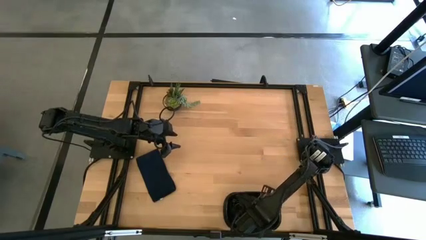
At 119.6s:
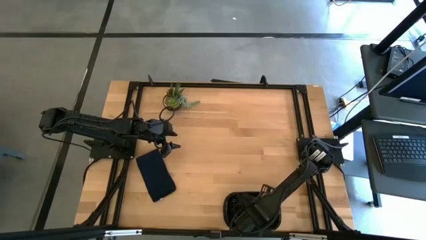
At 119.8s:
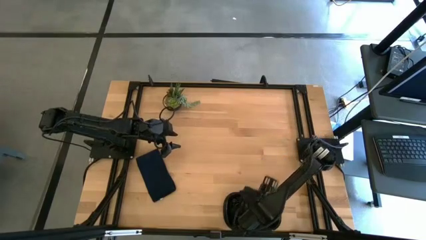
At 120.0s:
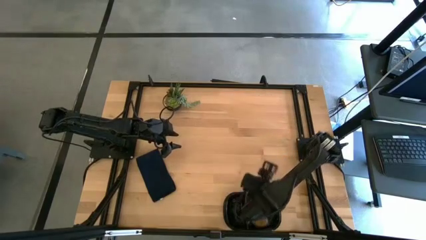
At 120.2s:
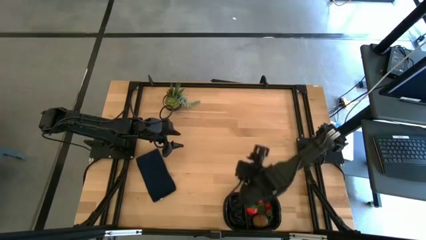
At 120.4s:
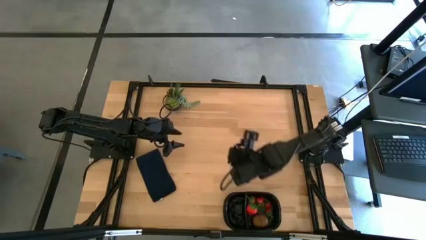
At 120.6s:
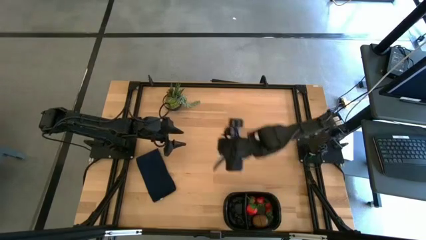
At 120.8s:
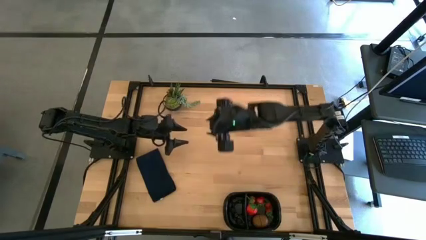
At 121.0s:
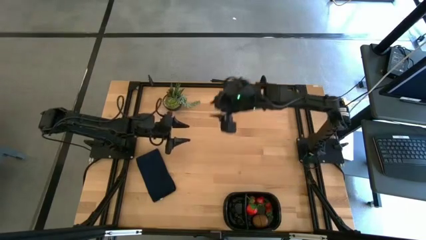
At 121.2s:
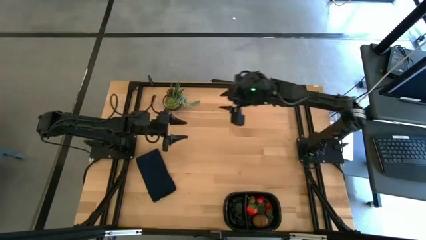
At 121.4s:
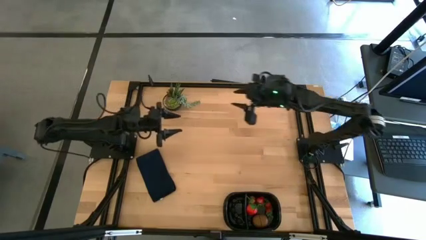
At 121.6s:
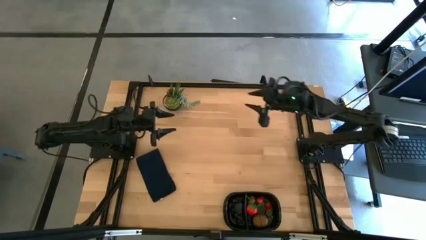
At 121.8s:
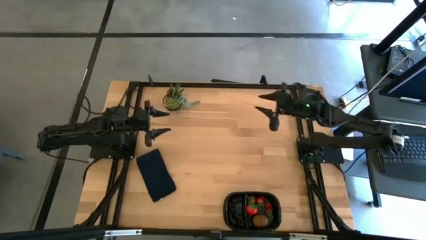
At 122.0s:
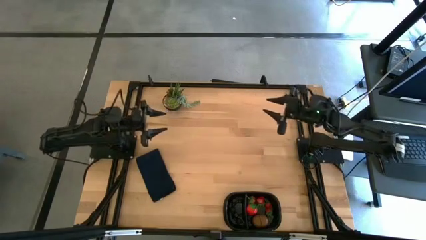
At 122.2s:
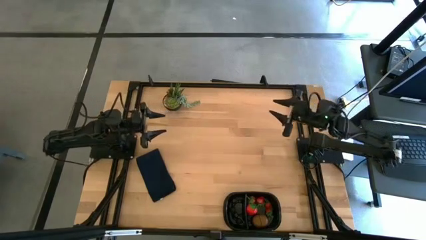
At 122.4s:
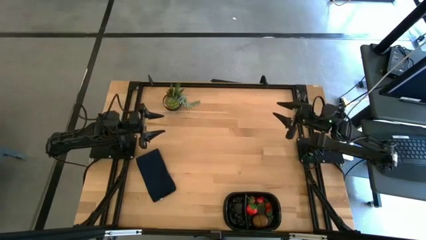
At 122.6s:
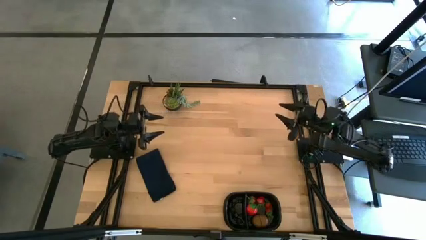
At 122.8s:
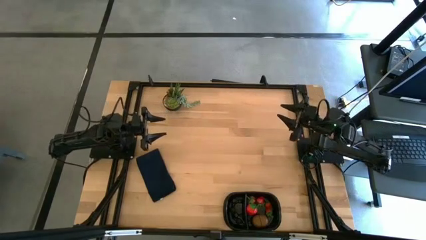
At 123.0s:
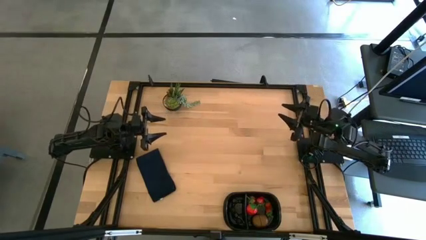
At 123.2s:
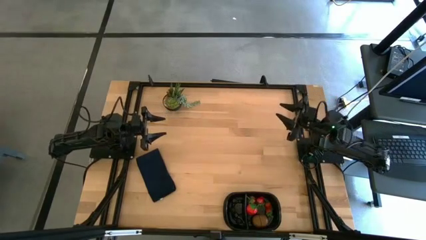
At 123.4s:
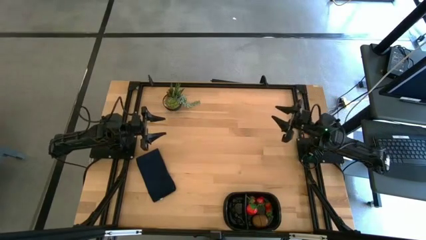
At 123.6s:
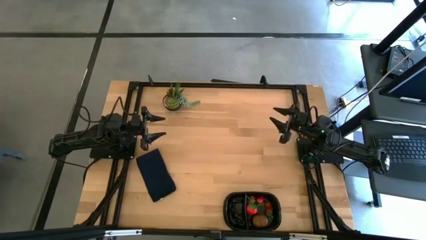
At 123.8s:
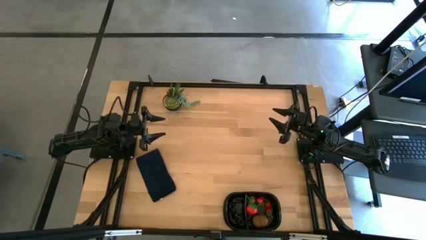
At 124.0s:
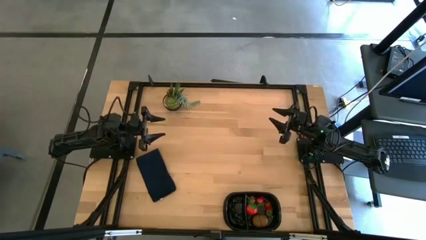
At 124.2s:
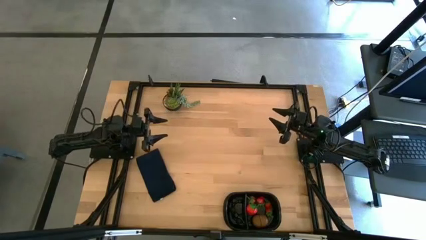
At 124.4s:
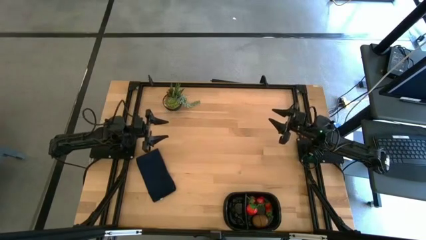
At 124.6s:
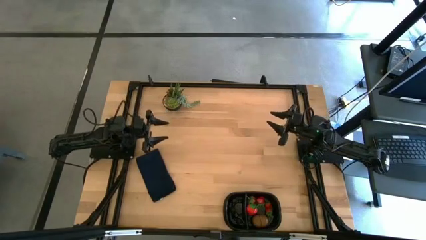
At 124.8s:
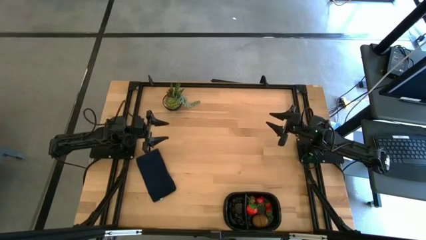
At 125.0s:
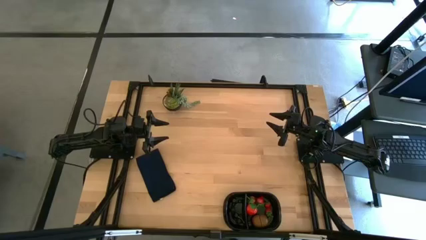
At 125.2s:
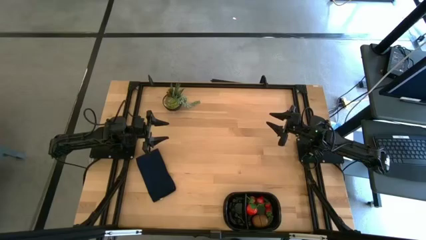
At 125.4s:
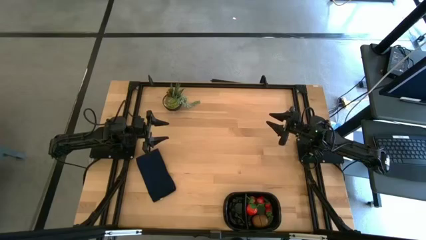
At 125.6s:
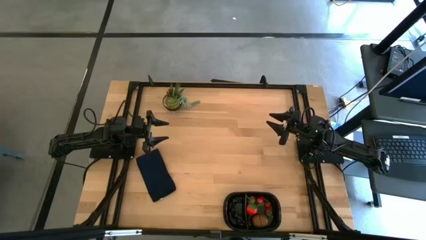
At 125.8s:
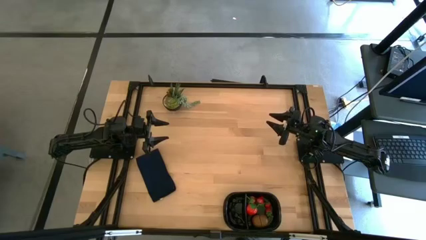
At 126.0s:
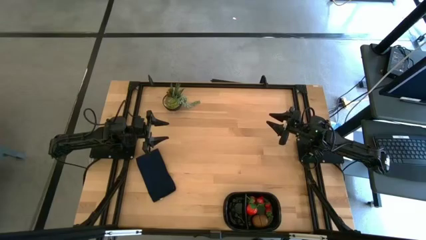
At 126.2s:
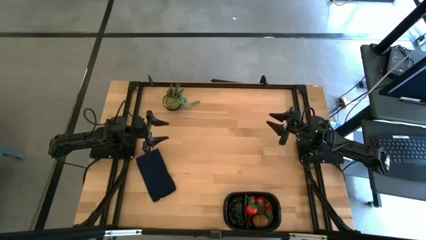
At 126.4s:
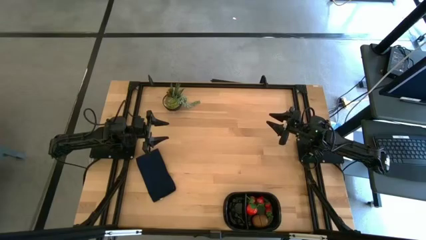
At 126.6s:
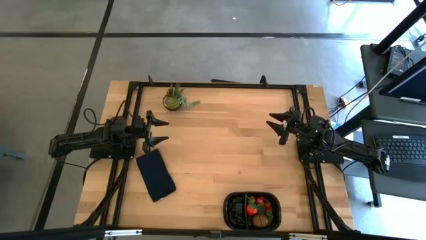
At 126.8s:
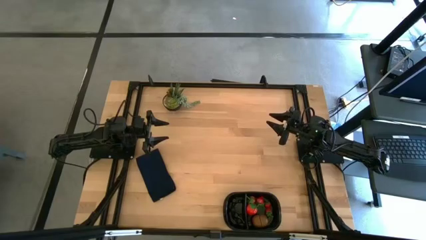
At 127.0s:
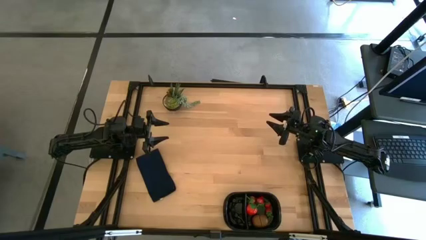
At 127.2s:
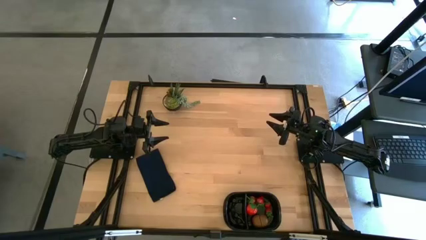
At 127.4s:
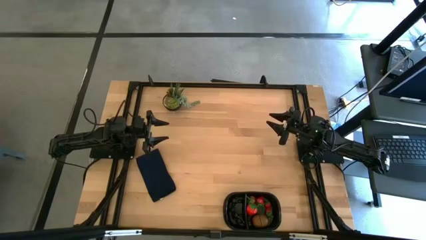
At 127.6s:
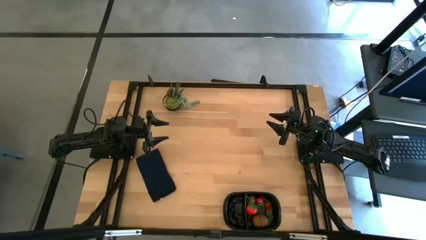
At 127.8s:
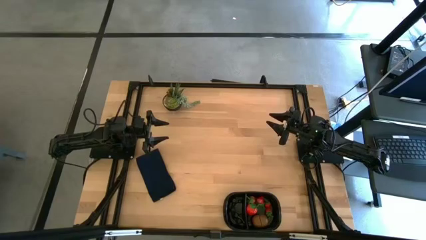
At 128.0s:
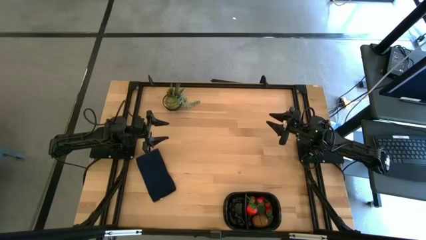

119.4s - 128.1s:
Task: Pick and placing Produce into tupperware
Return to Home Position

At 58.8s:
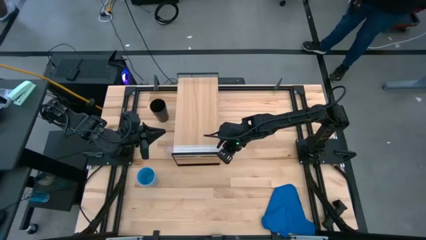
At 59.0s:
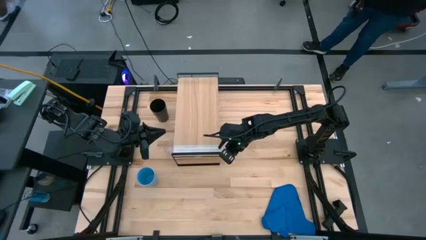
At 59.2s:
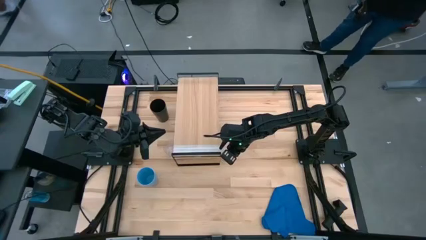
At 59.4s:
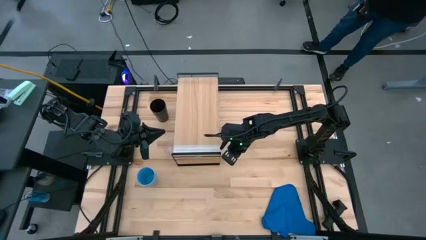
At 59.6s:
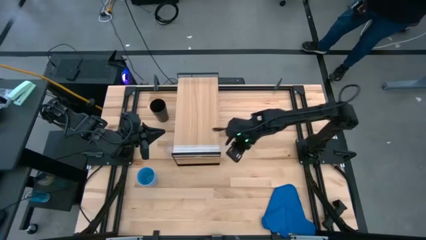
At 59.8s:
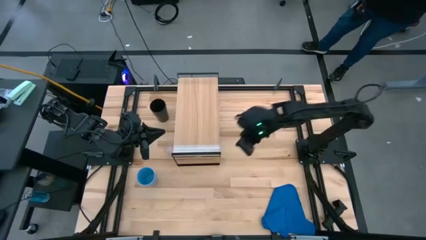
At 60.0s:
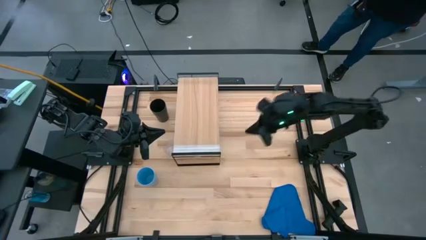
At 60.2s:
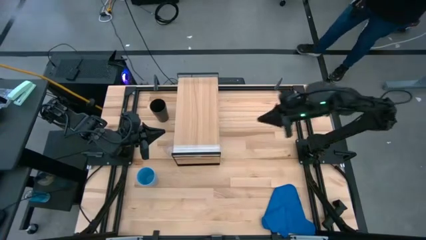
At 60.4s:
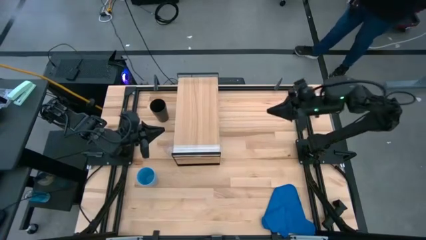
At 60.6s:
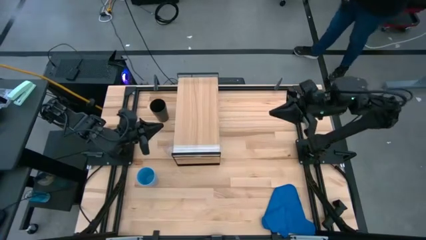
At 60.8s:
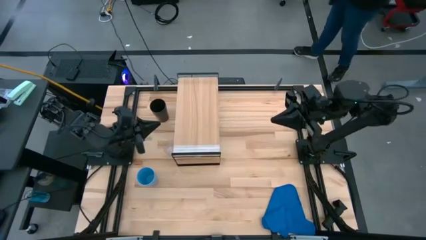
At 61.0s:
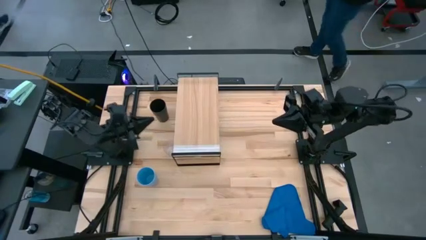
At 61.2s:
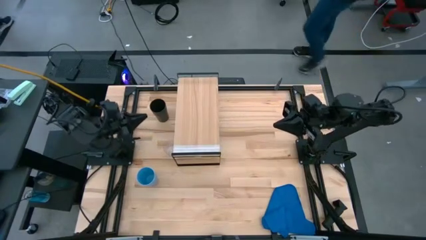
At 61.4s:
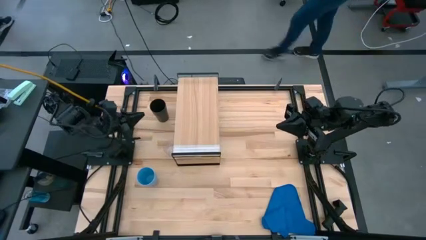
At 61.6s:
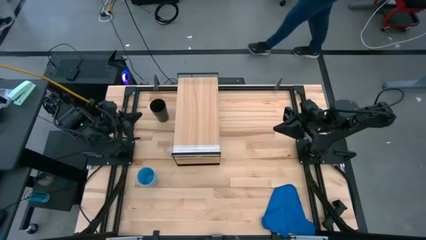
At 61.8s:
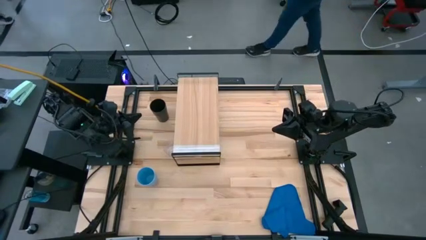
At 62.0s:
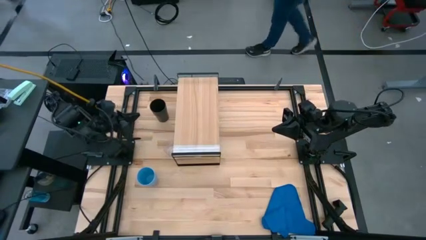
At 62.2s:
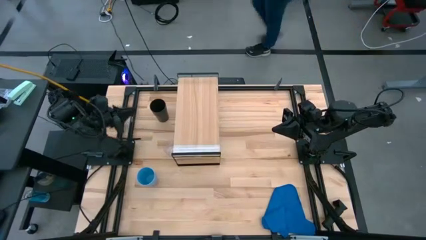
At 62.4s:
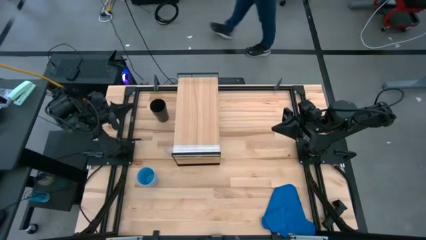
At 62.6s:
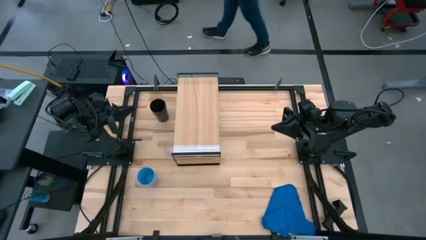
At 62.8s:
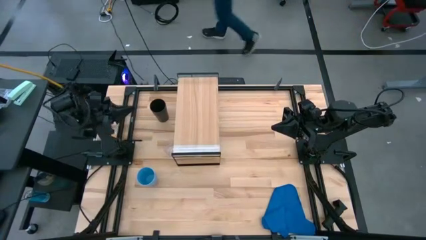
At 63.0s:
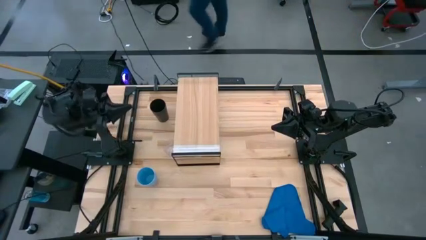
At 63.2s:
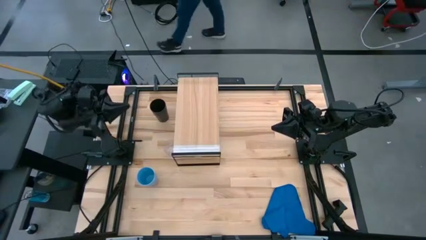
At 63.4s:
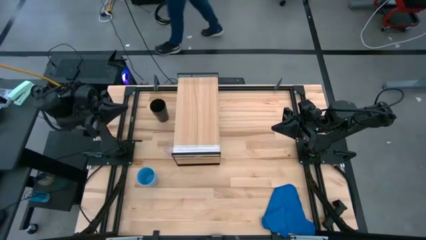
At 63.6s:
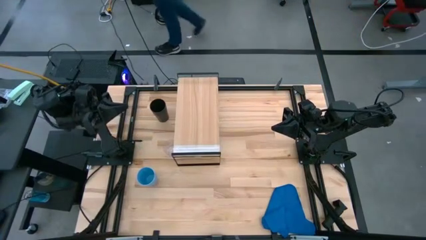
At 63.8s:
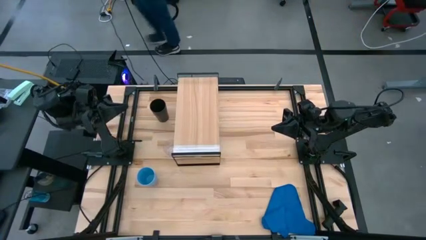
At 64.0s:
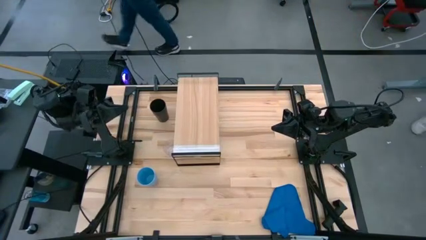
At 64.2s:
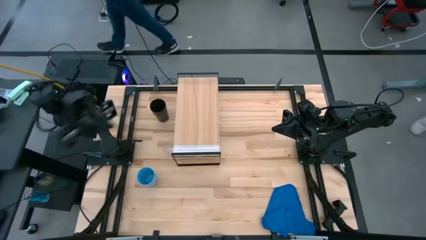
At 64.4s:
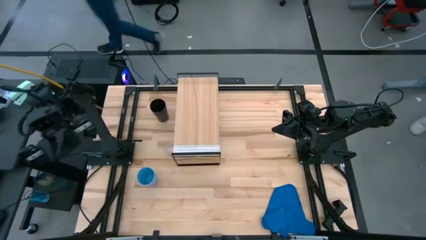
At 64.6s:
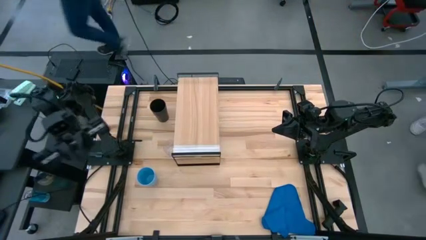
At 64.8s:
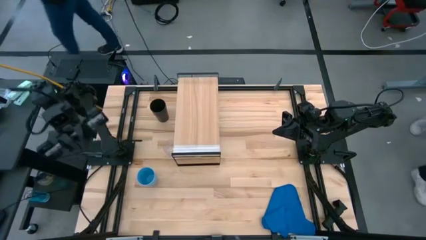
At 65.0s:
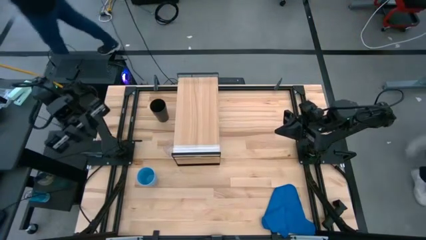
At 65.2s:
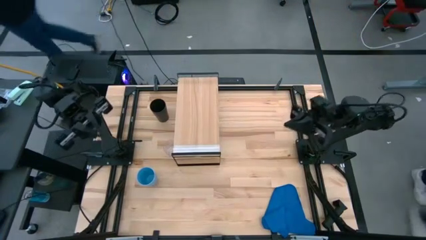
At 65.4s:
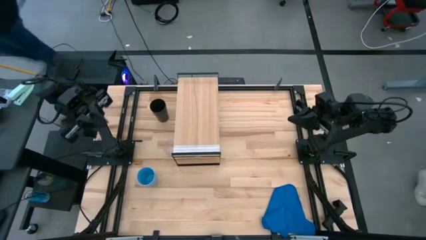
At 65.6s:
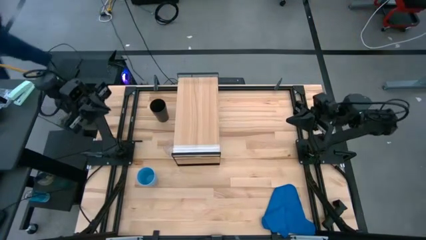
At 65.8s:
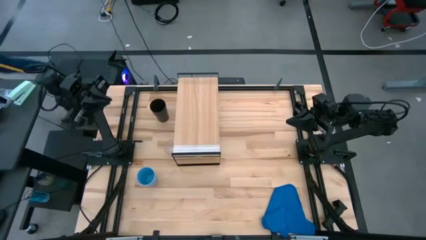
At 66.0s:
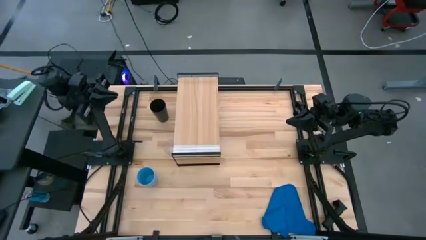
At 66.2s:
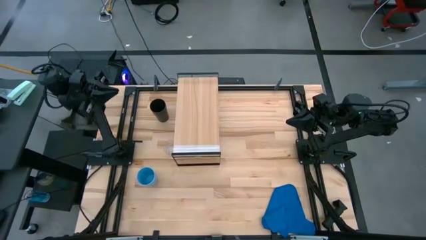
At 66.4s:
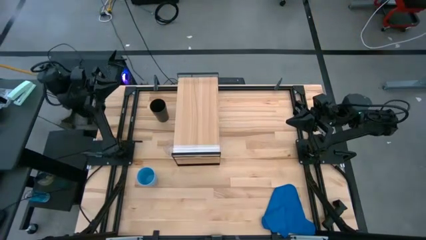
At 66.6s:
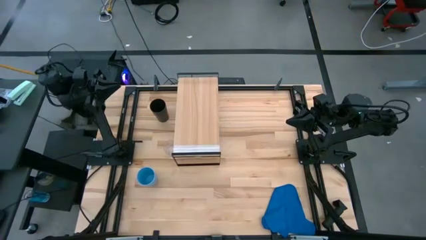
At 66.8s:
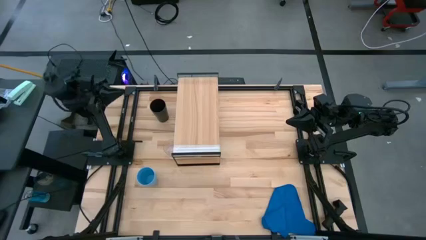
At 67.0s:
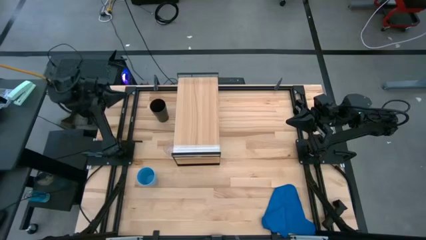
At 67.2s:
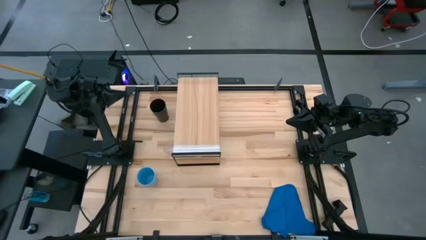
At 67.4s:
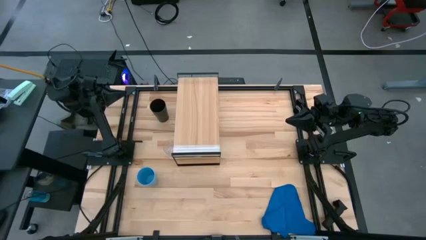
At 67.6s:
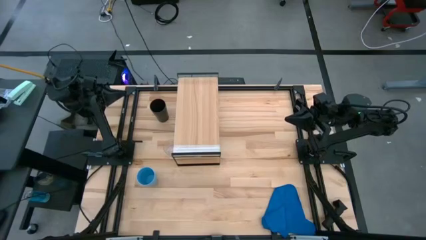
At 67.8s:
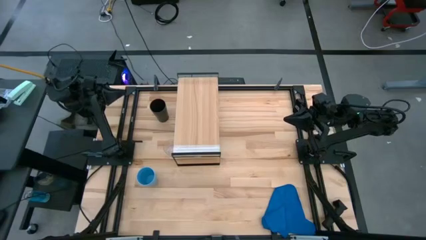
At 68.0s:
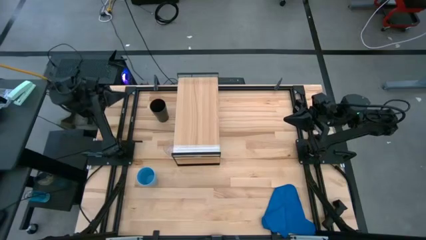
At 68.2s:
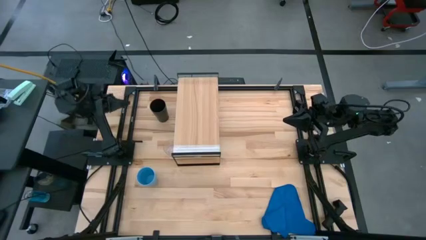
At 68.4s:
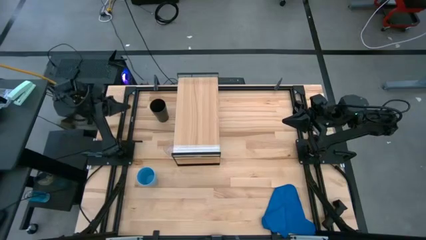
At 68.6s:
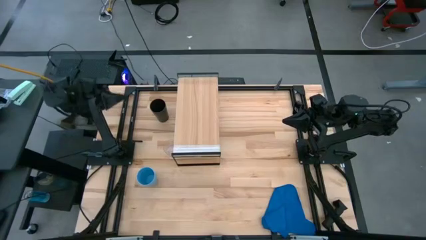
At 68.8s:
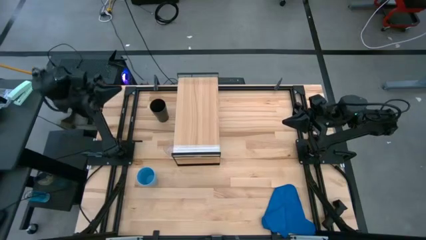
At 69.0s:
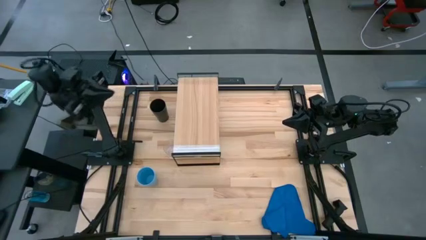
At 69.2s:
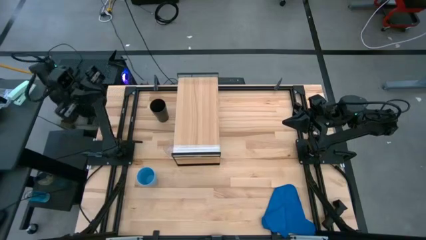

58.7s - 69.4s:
Task: Stack small to large cups/mugs on shelf
Put the transparent mug on the shelf
